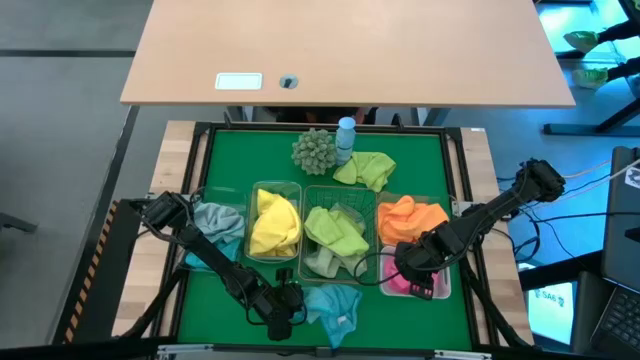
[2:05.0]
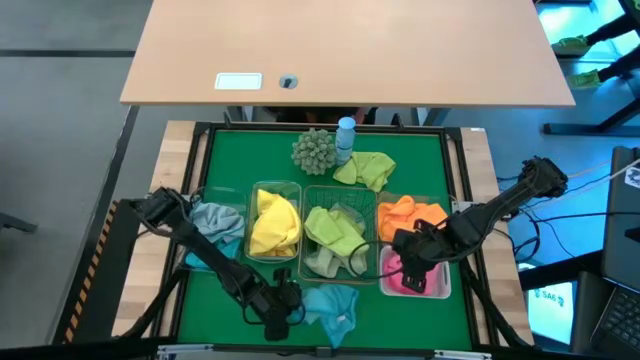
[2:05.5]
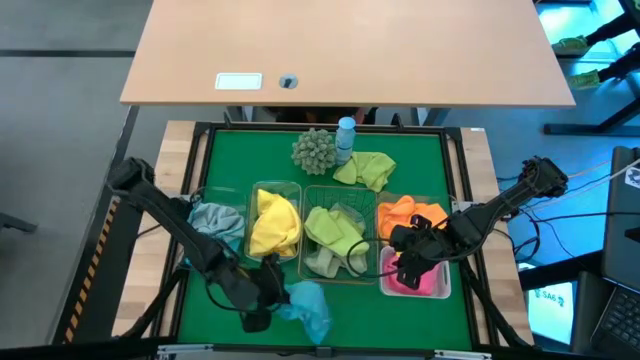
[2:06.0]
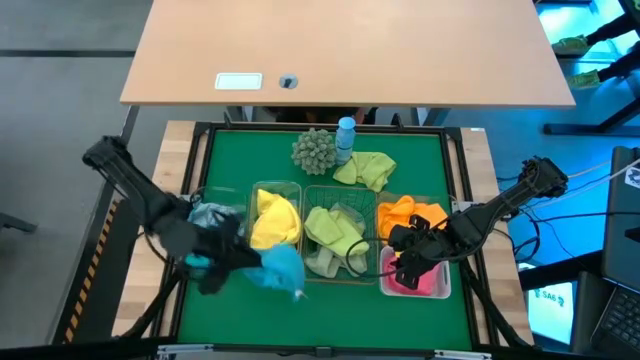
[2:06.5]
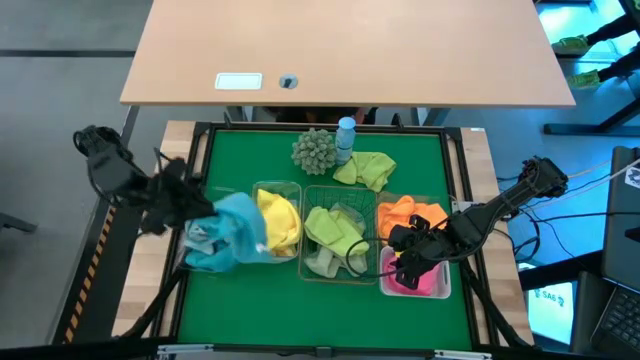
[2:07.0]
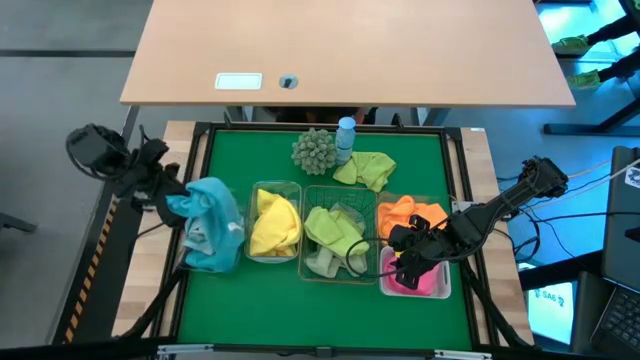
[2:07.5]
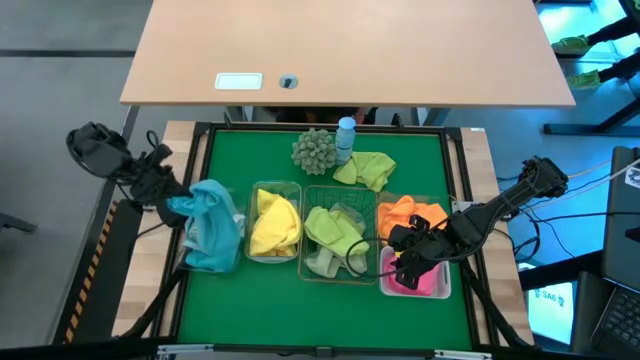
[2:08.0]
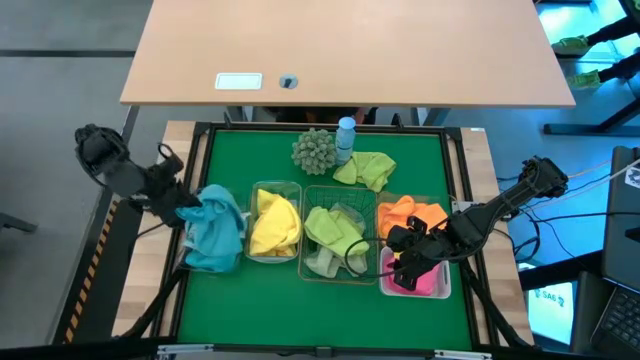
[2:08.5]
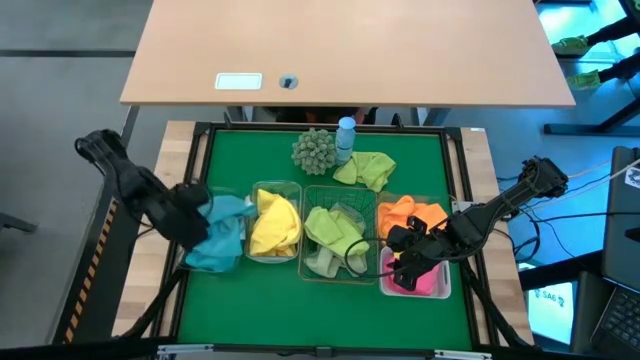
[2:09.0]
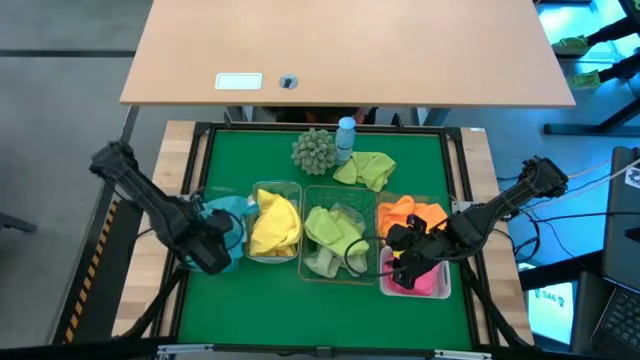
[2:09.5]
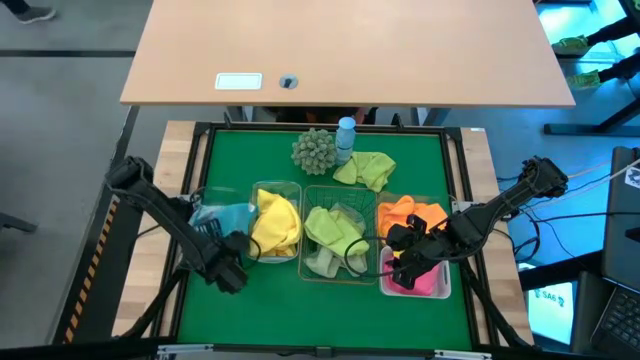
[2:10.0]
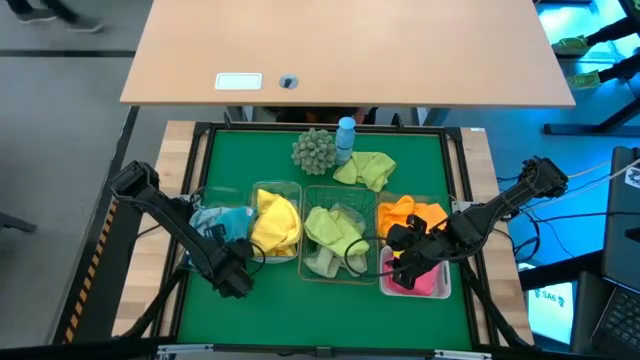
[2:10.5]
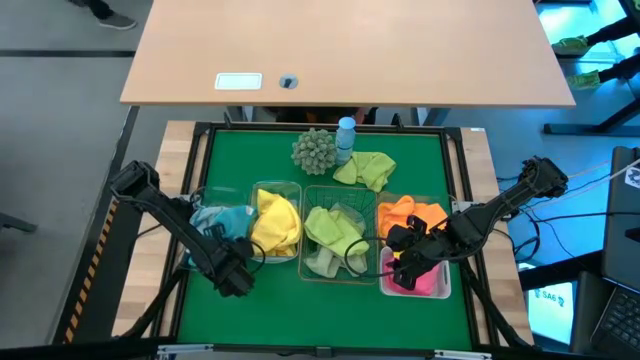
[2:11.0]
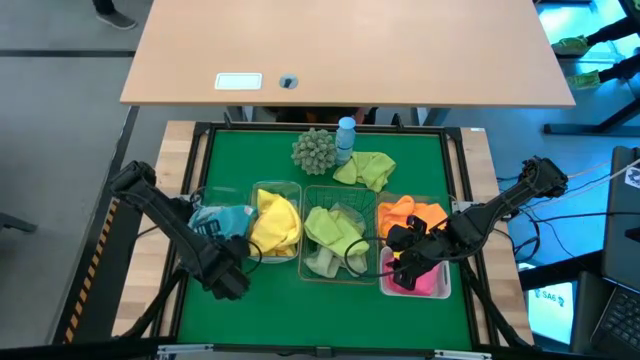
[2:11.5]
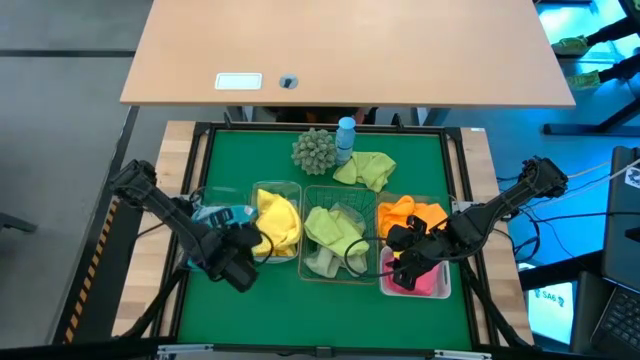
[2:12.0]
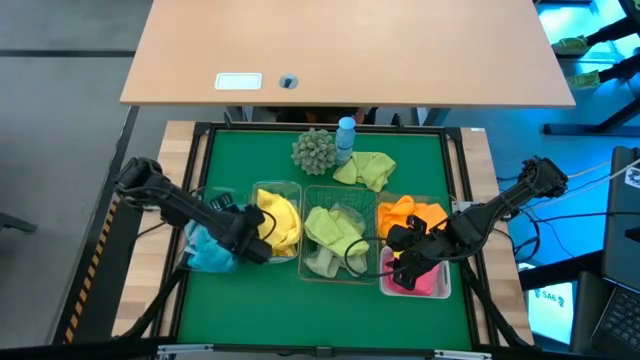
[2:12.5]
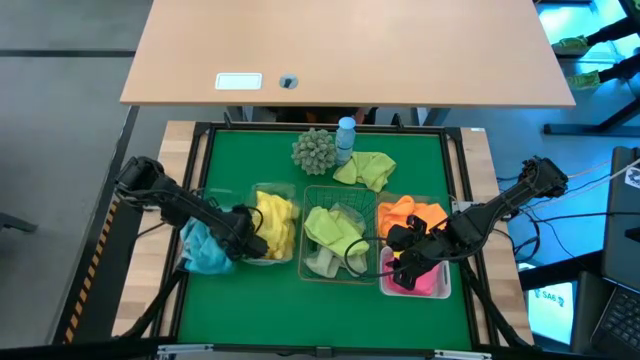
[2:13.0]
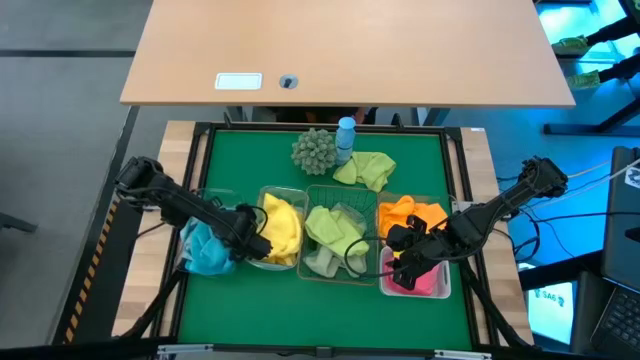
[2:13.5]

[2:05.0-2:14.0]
Task: Sort microfiber towel by color & place in baskets
Put the blue microfiber cloth into the left transparent bin

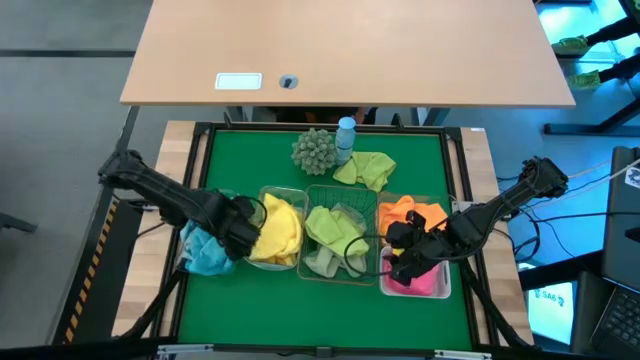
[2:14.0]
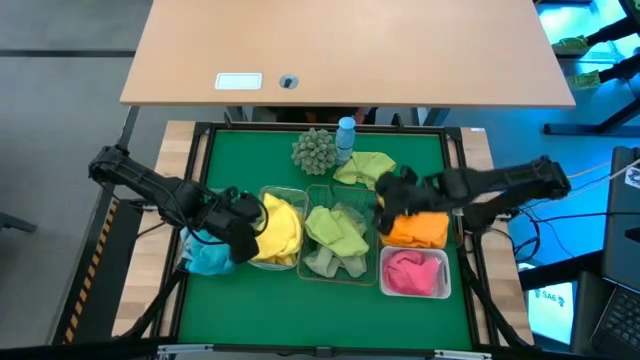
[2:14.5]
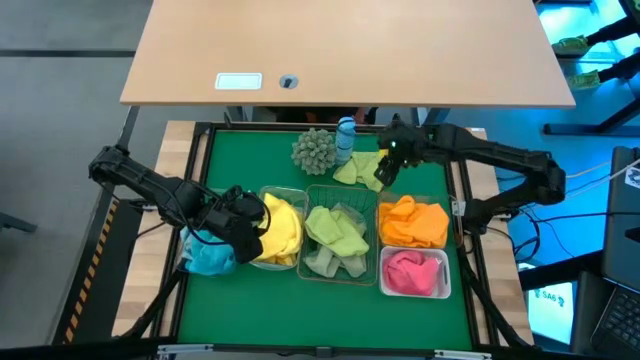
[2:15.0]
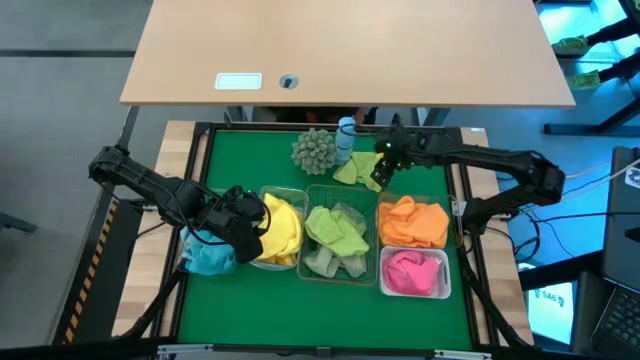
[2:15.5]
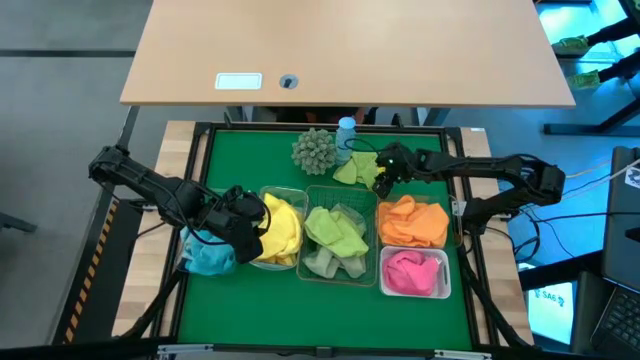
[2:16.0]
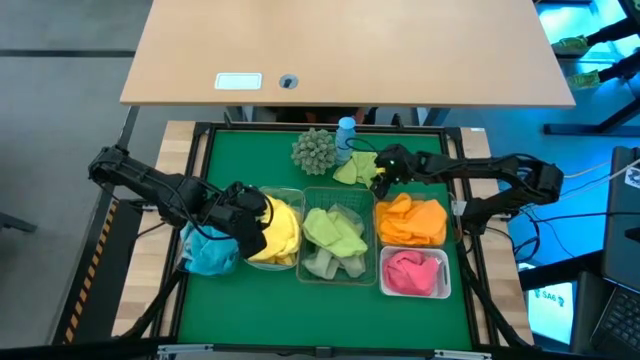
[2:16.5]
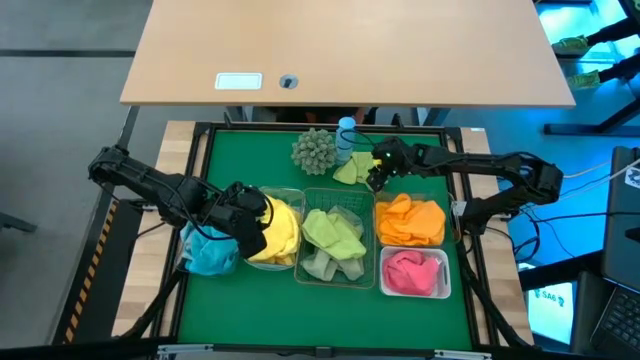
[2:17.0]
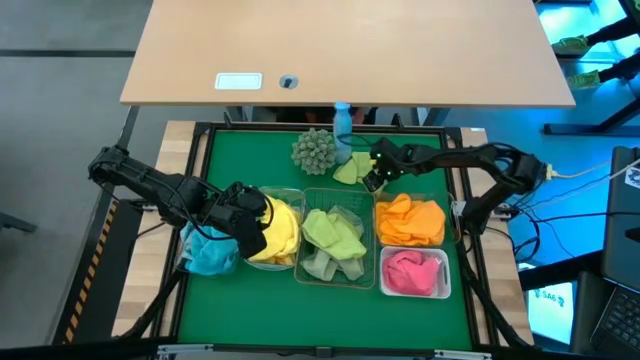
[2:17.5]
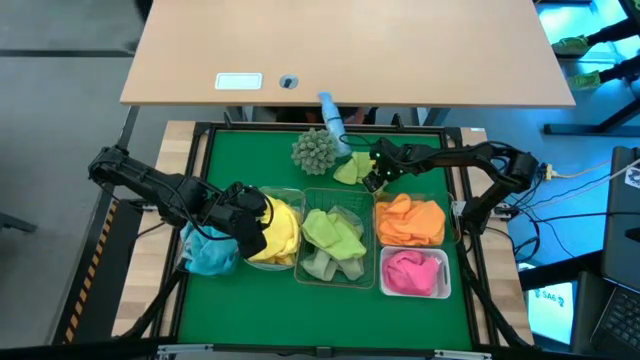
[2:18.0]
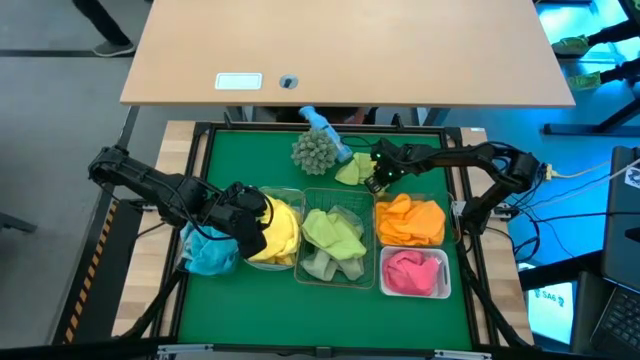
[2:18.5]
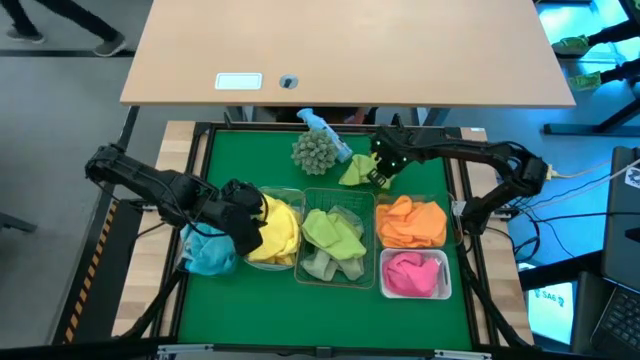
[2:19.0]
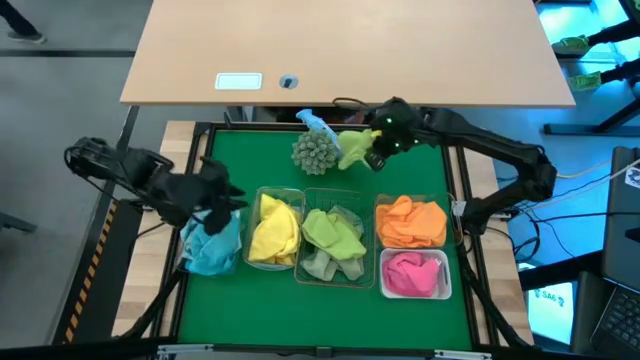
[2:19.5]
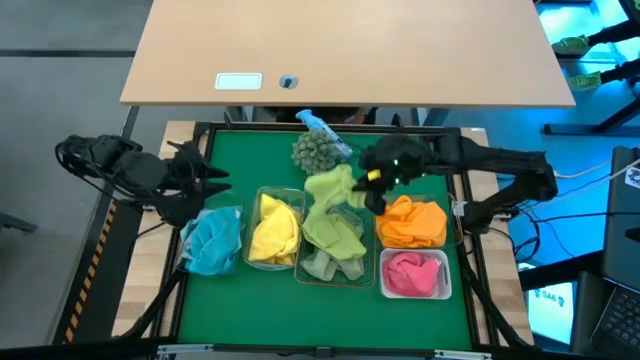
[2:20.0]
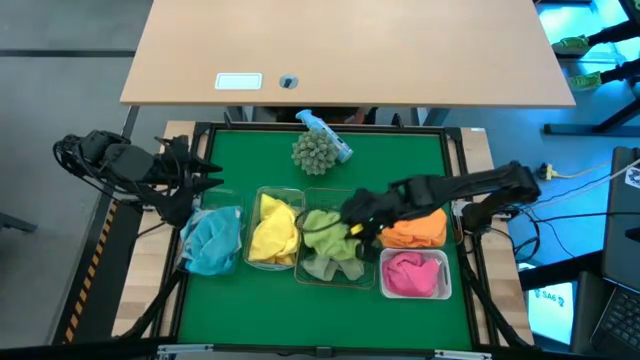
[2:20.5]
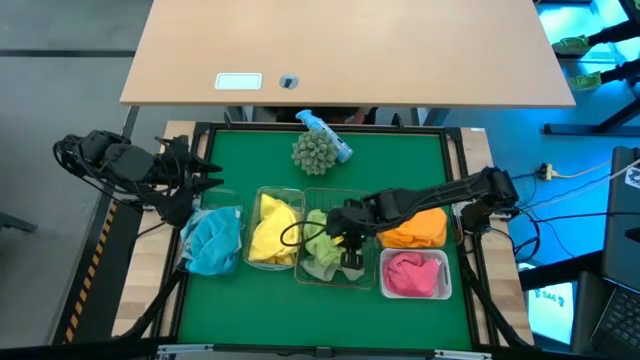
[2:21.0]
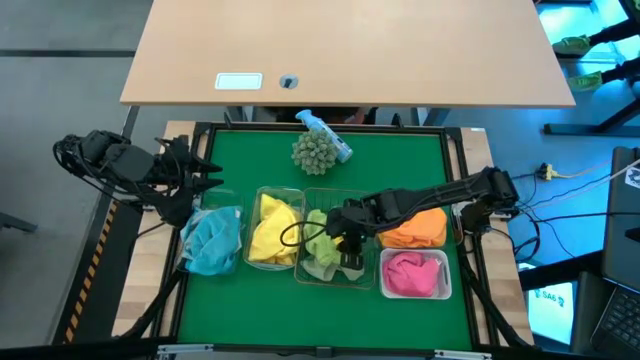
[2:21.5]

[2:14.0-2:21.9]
Put the green microfiber cloth into the black wire basket

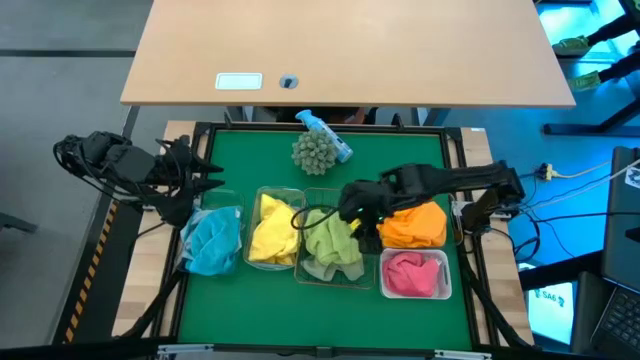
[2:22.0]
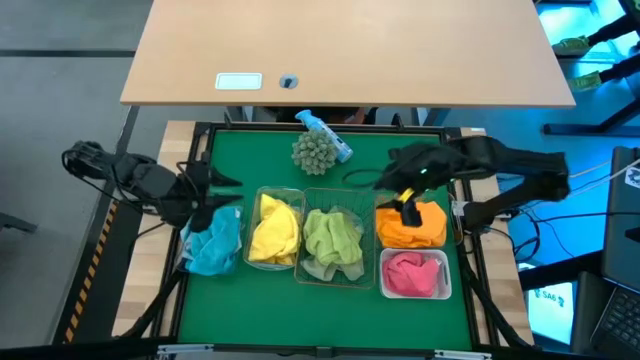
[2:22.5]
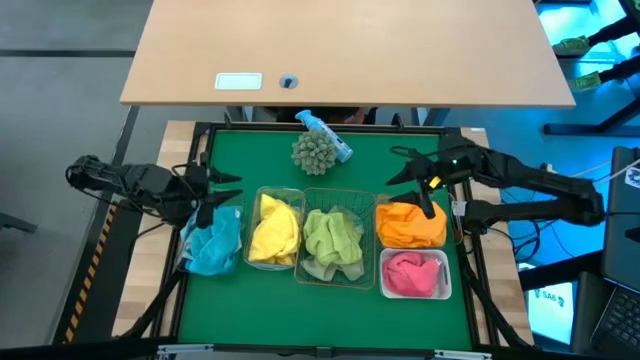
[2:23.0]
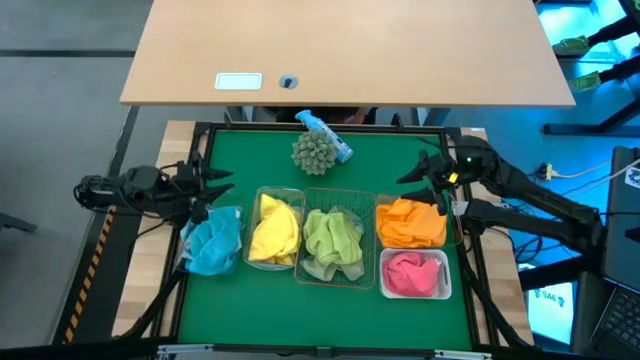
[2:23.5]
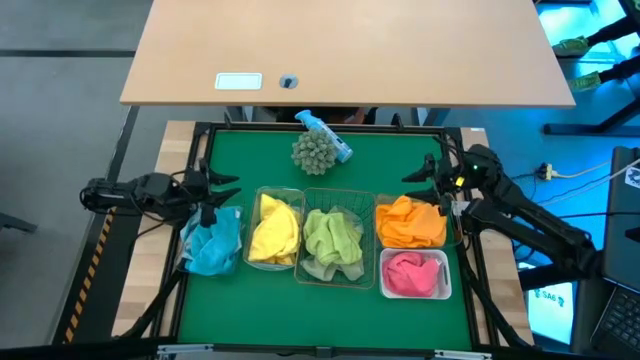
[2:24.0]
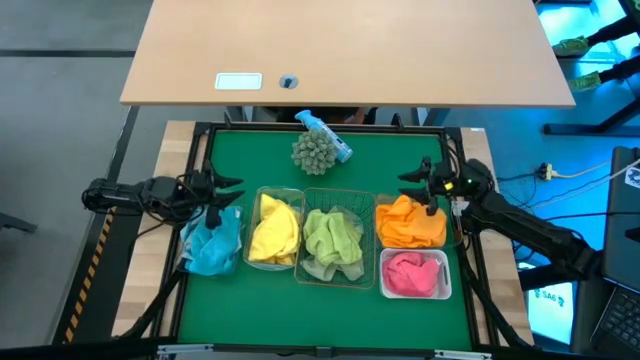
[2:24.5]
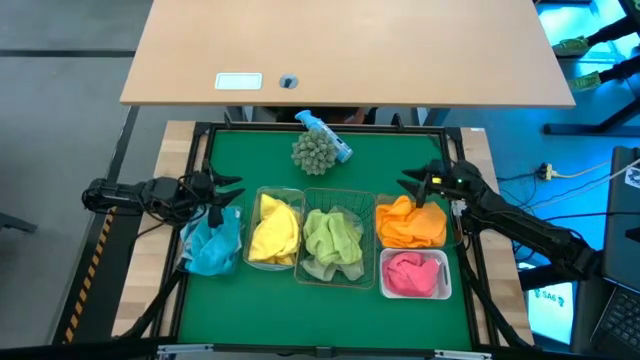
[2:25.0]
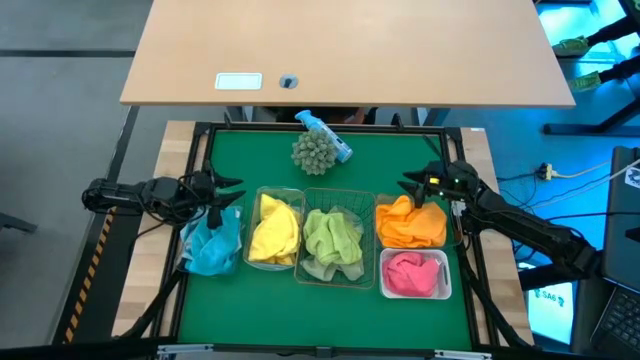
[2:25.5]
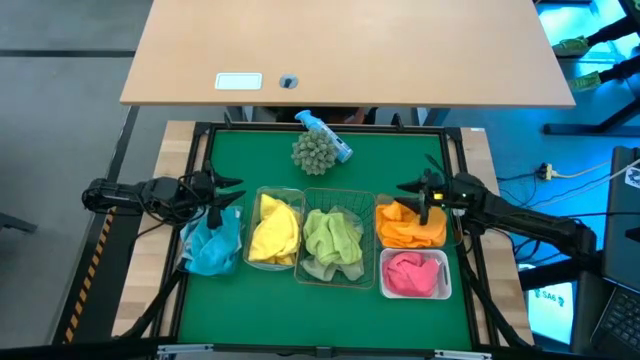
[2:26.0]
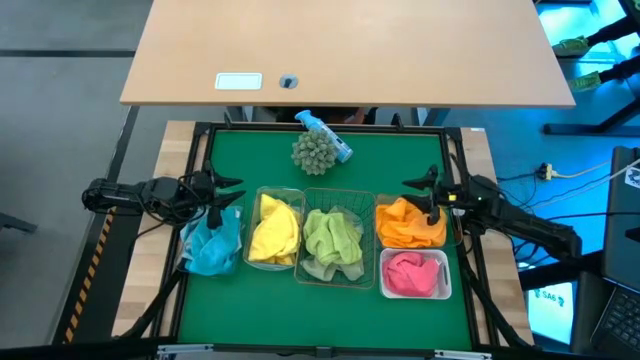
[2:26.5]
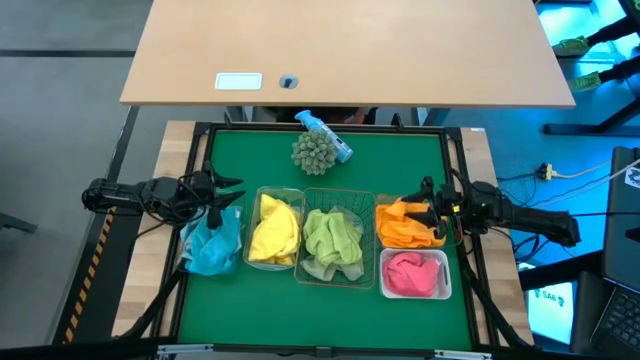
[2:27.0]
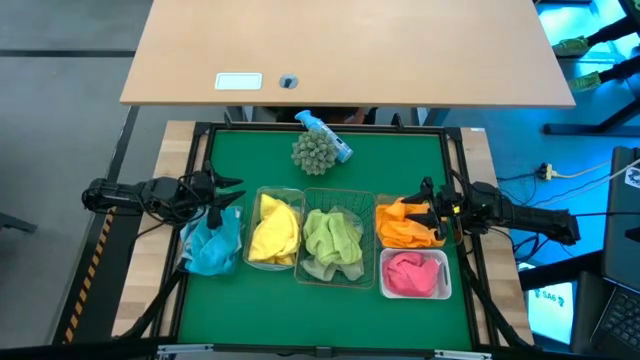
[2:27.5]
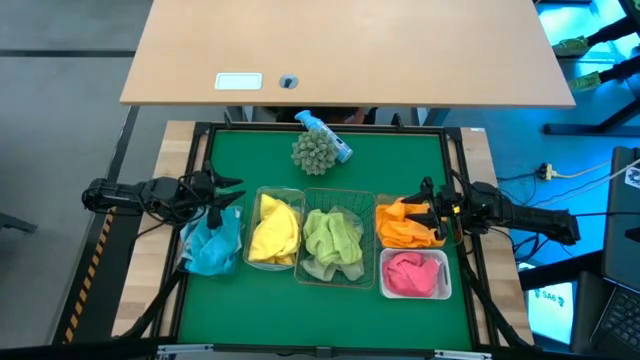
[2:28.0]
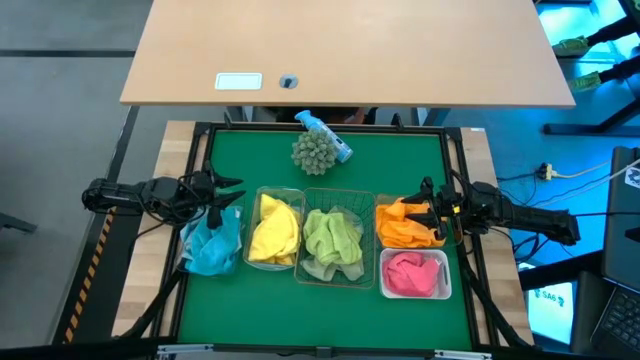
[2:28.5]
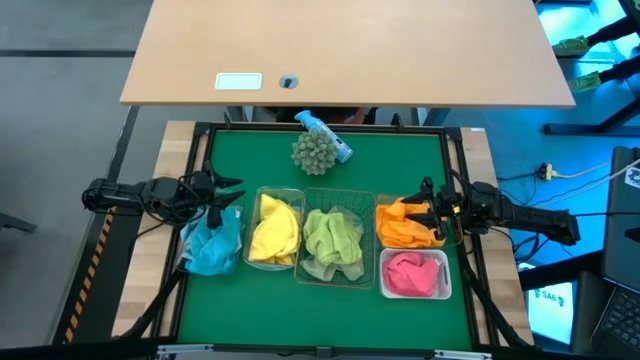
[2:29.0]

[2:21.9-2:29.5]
Return to Home Position
